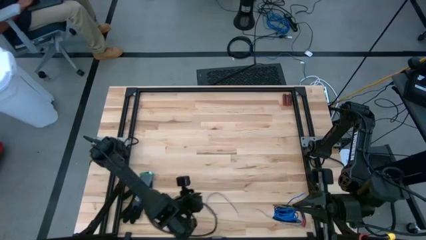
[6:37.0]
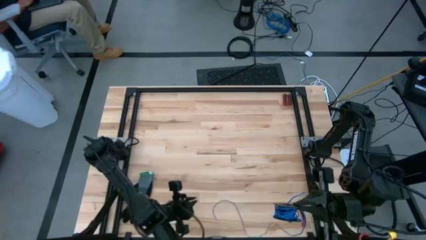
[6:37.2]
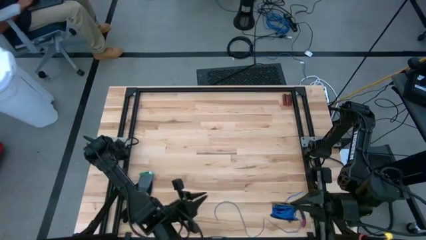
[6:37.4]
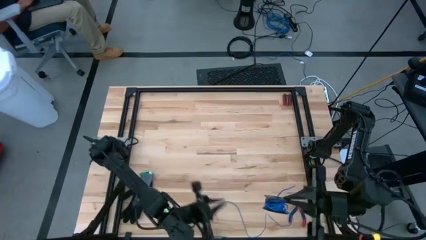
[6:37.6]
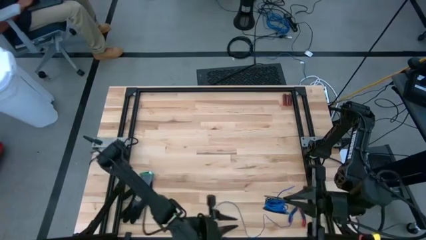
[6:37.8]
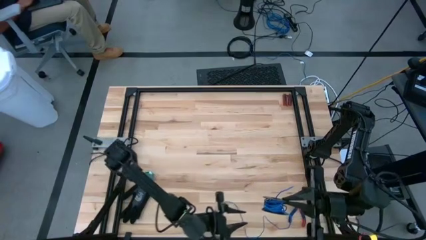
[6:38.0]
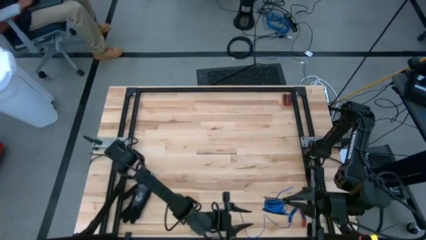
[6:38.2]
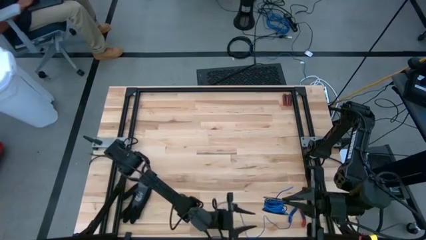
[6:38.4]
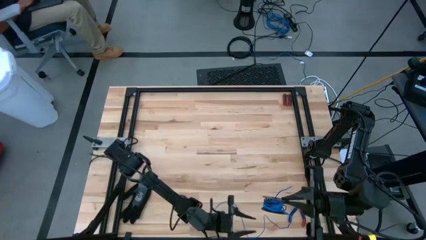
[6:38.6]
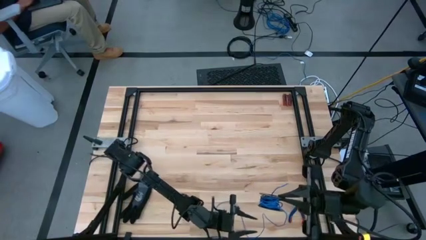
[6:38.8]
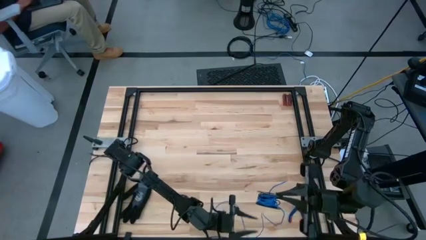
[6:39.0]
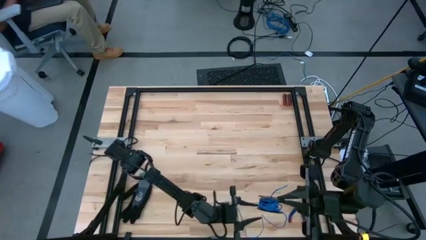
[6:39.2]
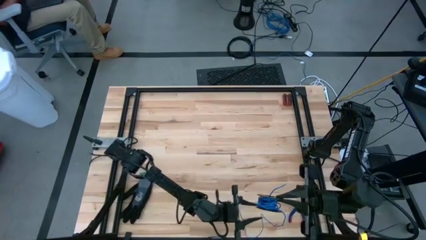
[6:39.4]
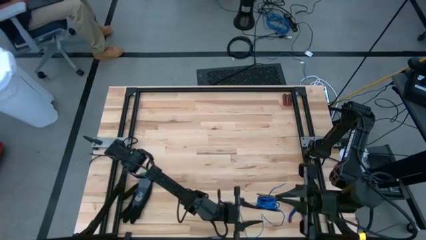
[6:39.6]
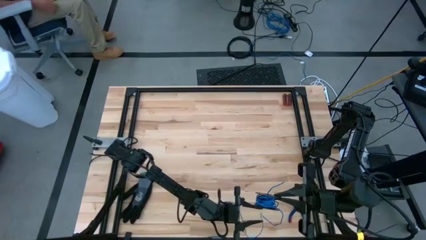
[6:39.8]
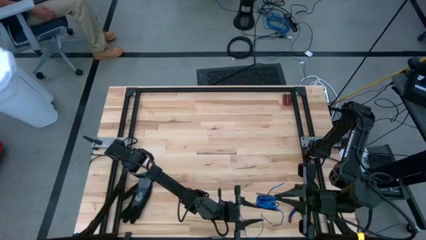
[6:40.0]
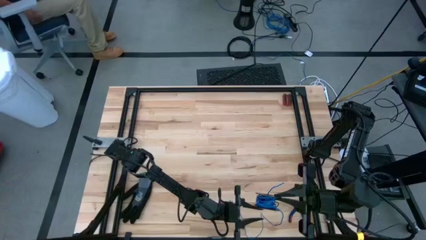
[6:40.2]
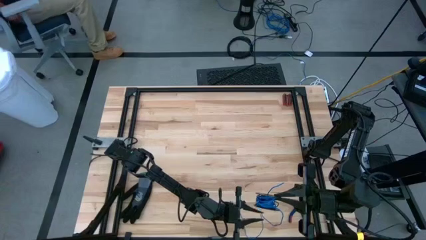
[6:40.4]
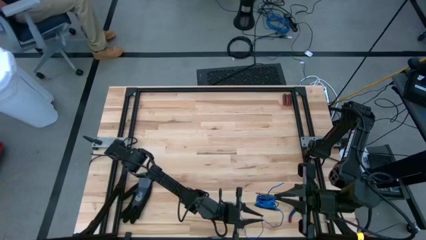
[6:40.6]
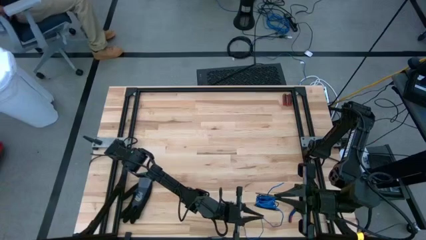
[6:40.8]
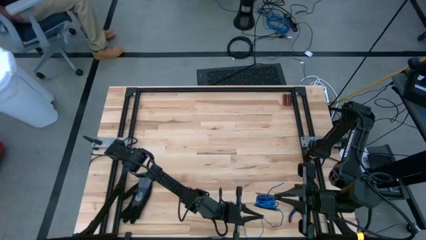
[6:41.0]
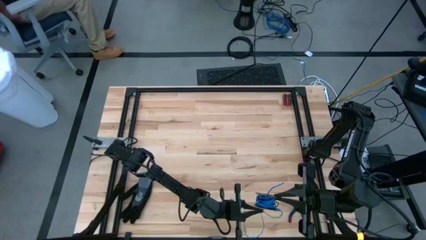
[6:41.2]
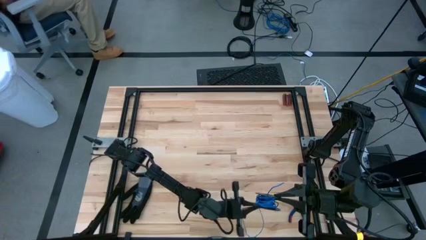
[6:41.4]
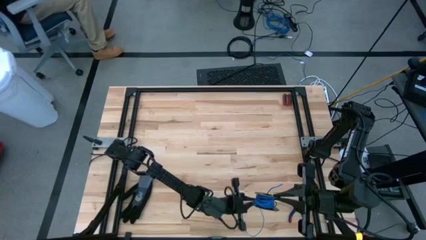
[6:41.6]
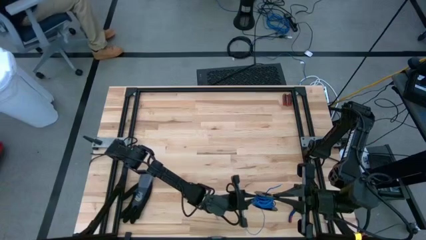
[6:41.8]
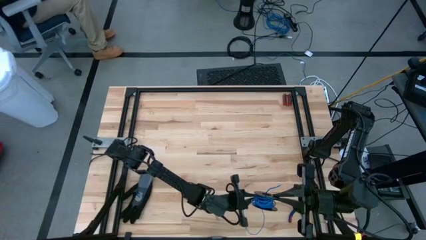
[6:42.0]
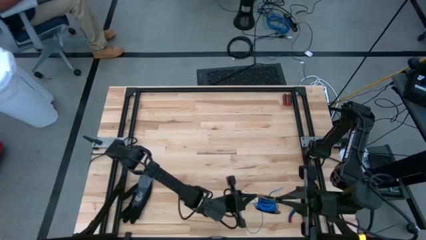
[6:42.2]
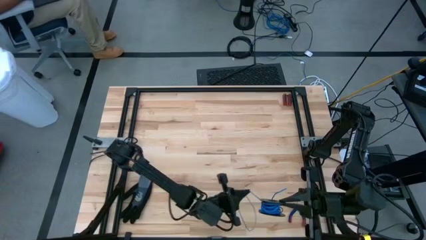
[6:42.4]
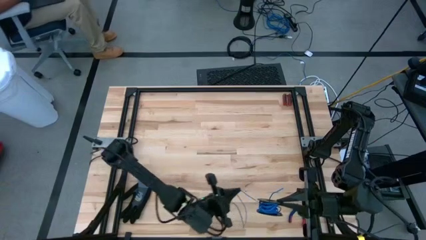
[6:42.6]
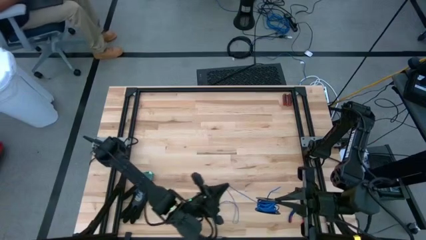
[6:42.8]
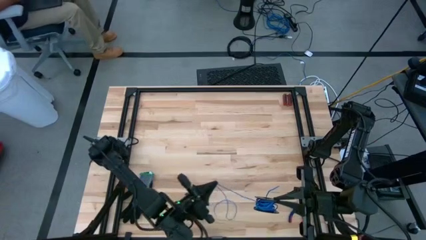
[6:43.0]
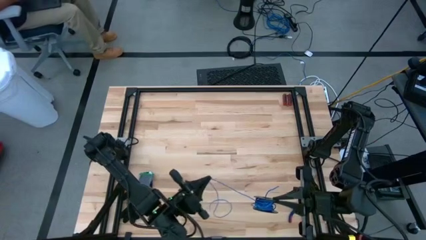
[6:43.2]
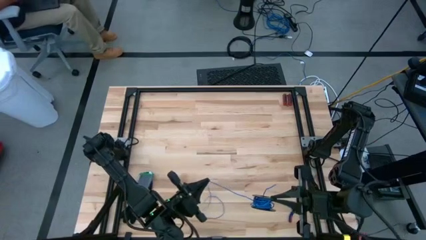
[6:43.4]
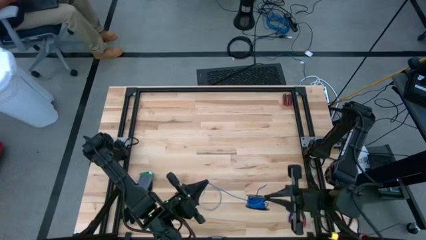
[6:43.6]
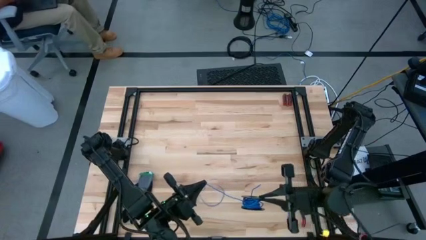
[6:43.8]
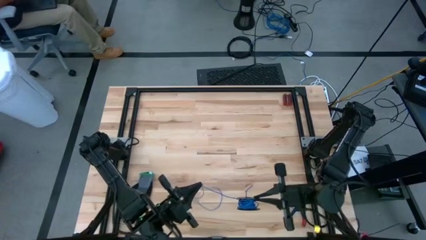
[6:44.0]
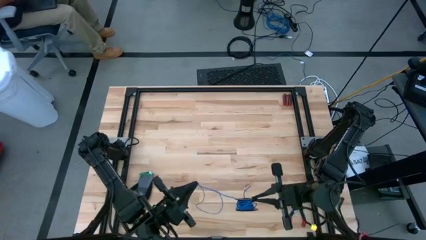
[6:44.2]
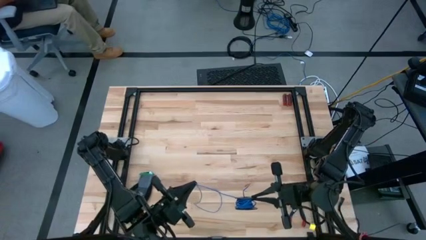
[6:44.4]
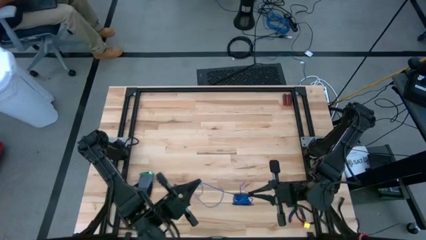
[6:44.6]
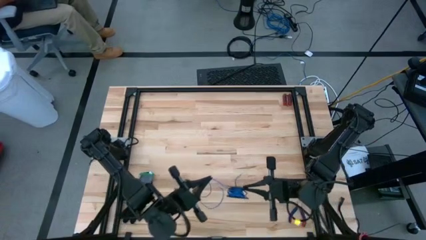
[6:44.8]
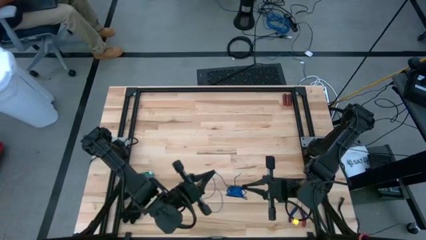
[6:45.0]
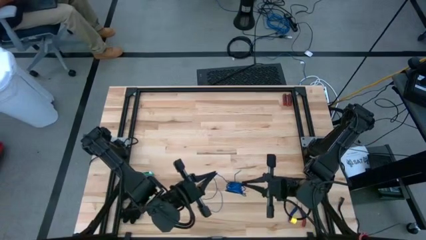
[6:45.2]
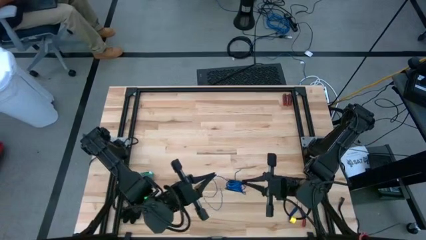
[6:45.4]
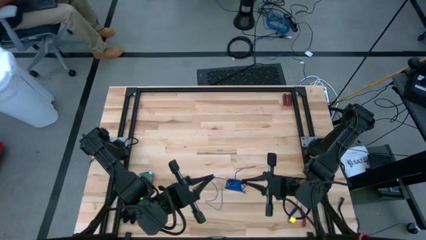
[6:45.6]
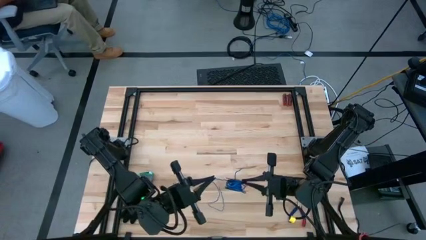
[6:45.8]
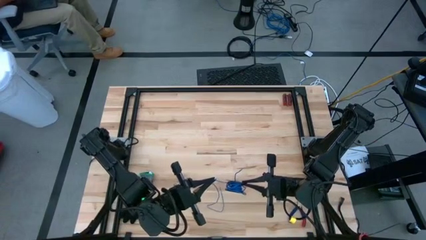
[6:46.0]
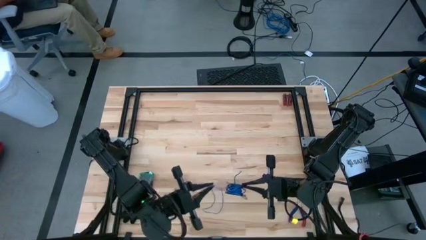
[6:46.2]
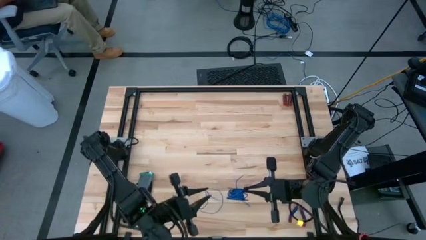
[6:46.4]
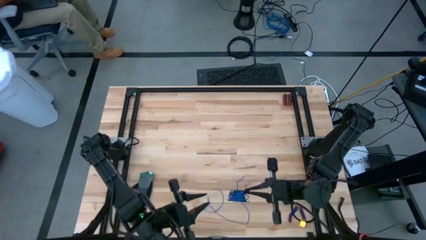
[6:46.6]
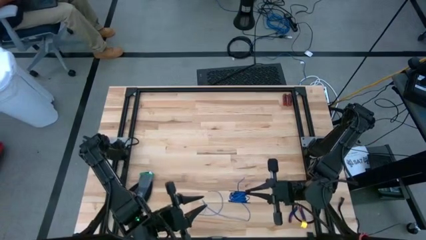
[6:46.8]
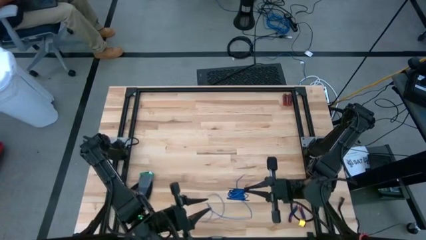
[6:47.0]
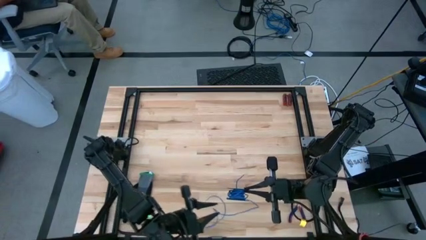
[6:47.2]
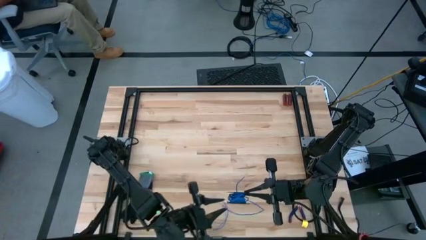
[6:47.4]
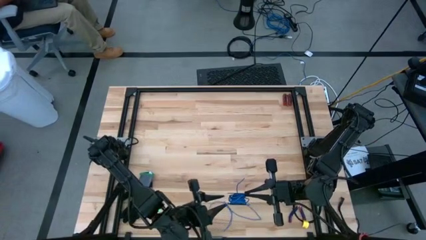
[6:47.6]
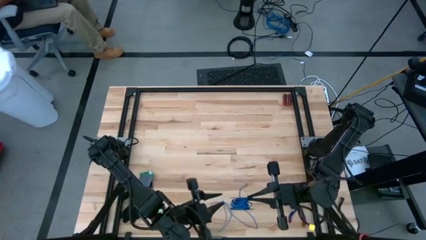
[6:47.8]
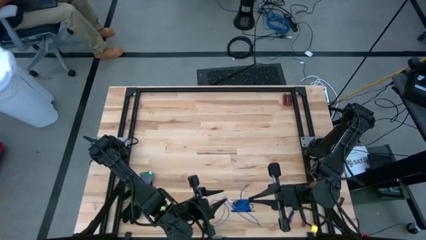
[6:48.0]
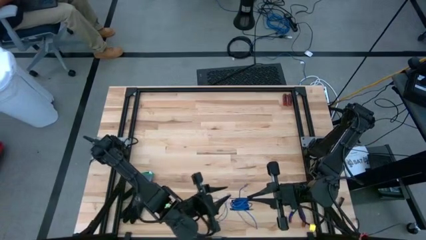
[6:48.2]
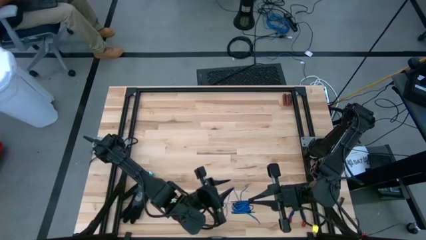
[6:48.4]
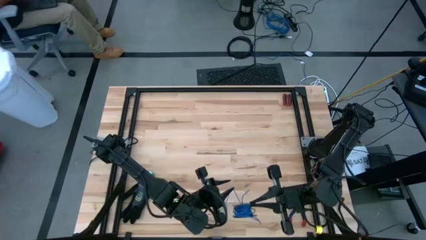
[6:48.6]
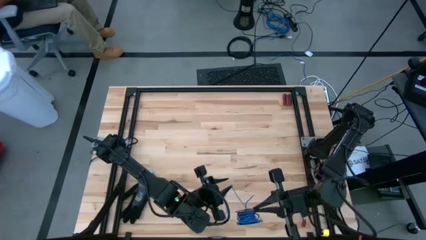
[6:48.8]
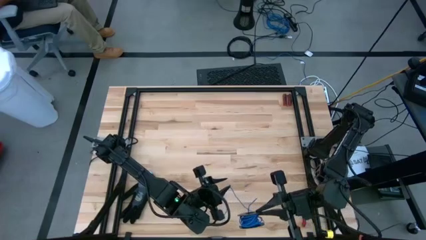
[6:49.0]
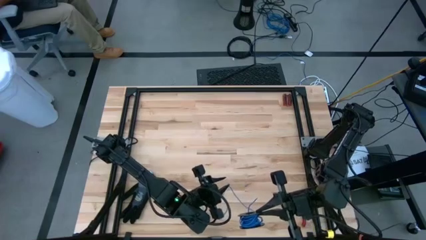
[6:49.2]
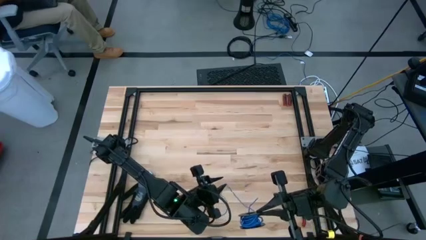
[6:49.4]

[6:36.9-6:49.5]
Task: Coil cords
Coil the blue wire onto the spool

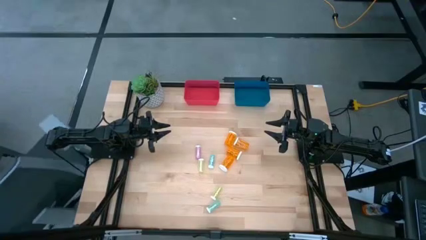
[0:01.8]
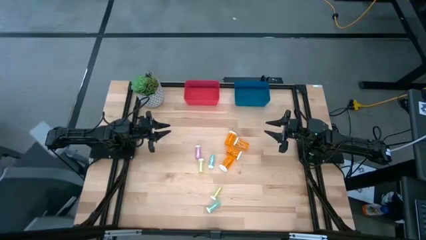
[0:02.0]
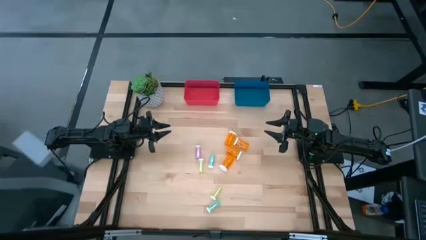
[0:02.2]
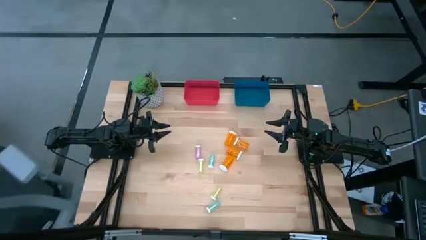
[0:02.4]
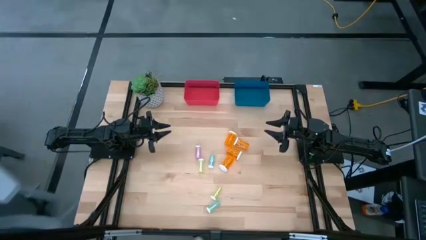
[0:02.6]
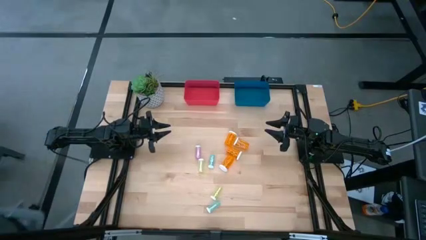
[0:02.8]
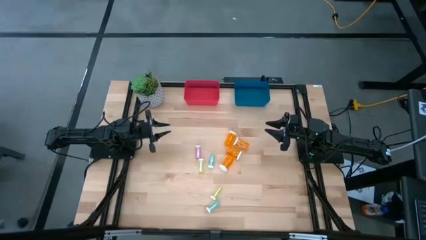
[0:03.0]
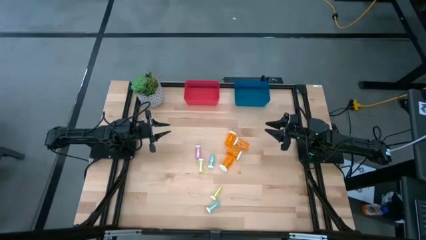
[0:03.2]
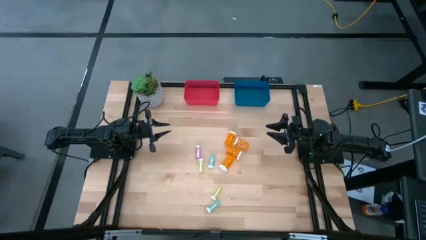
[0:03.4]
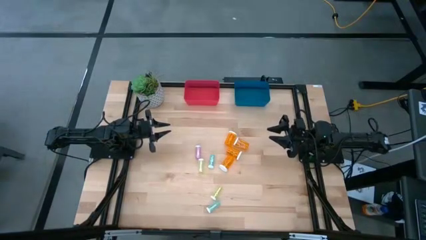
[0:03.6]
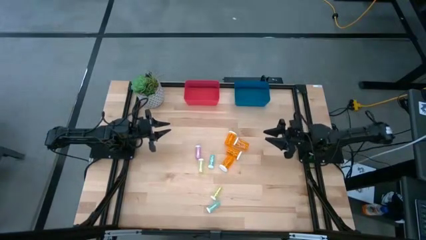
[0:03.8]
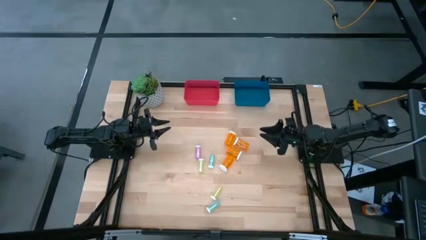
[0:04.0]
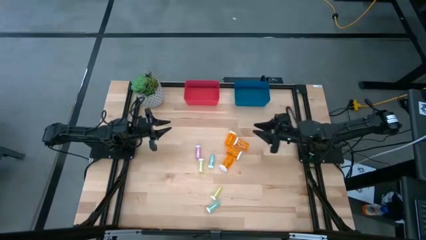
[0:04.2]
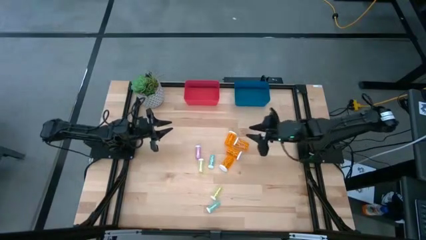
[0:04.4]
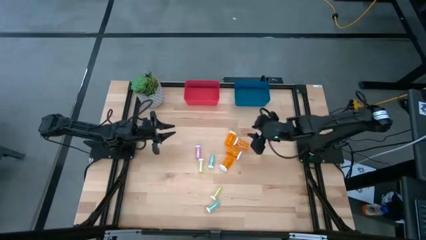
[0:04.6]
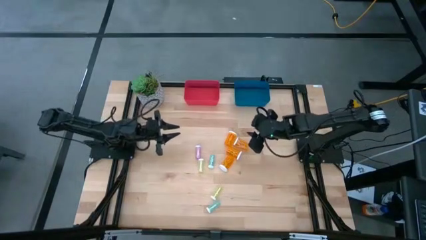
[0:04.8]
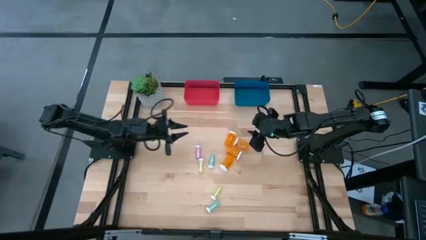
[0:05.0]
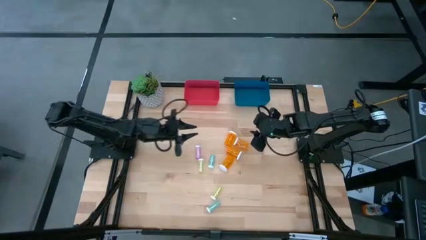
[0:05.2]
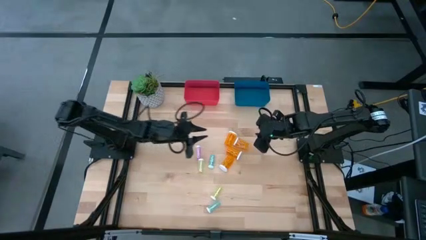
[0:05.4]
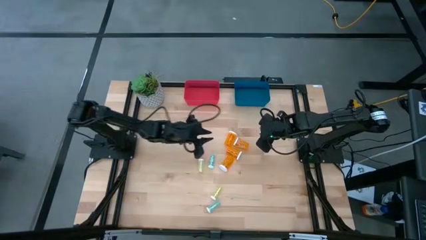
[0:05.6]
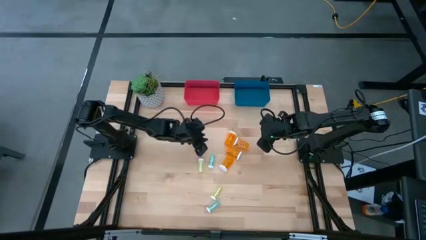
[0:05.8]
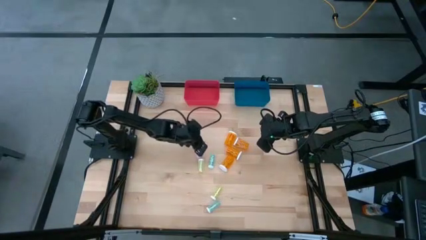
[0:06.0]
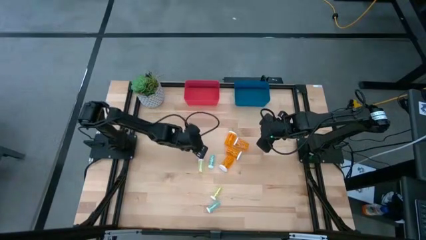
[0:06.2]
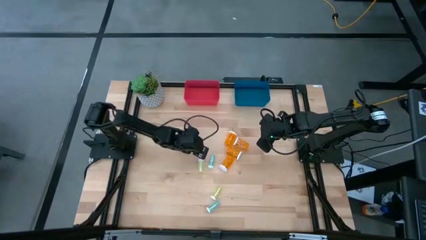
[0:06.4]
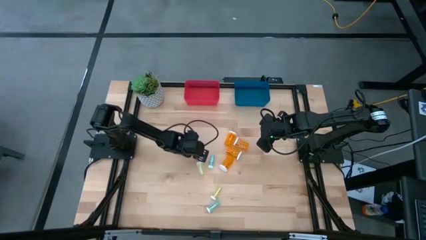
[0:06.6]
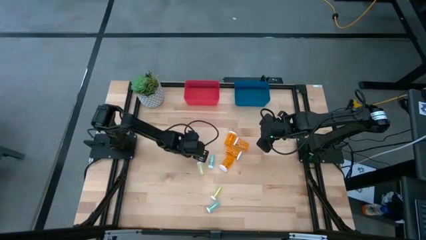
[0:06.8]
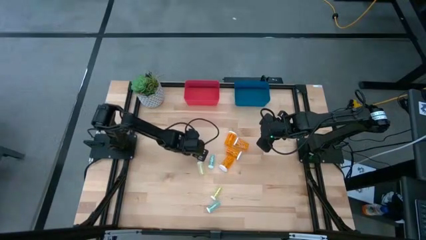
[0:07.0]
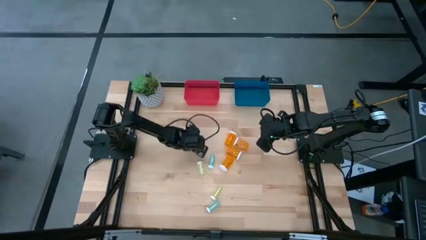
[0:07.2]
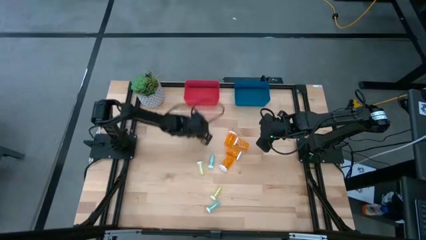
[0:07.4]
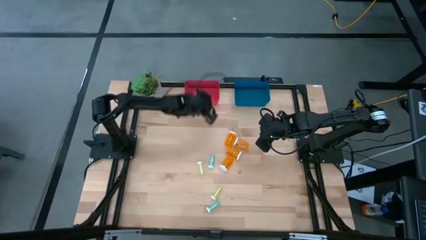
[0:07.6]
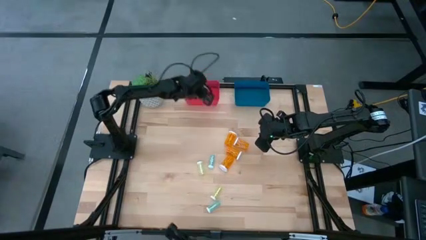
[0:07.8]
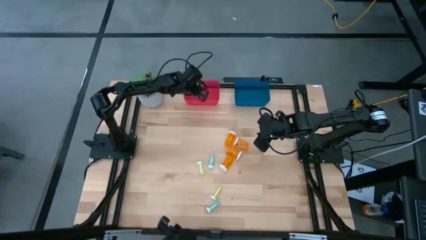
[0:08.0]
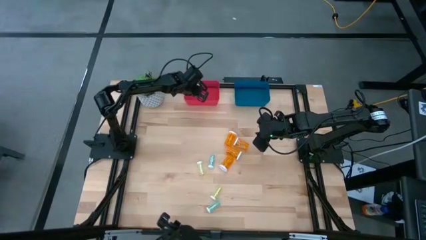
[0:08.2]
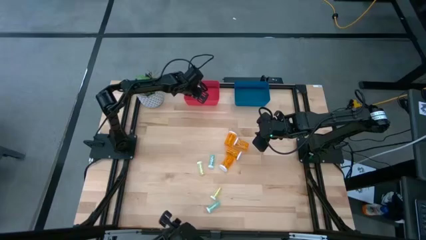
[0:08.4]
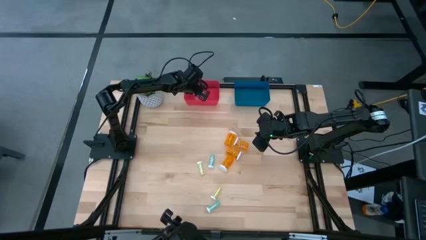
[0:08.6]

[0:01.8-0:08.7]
Task: Pick and place medicine bottles into bin by pill shape (circle, oval)
Put the pink pill bottle into the red bin
